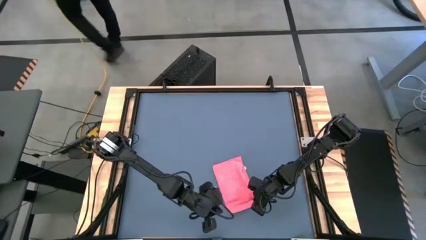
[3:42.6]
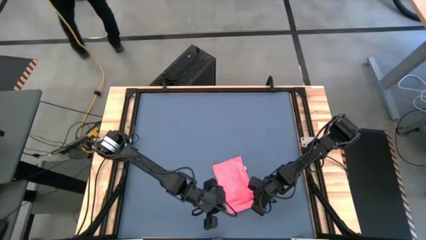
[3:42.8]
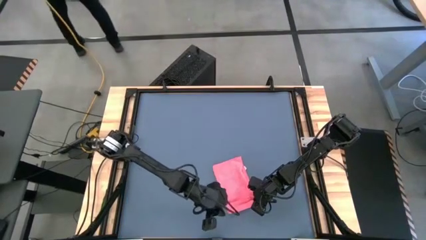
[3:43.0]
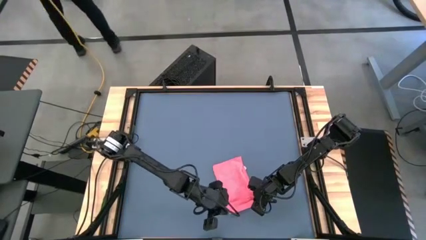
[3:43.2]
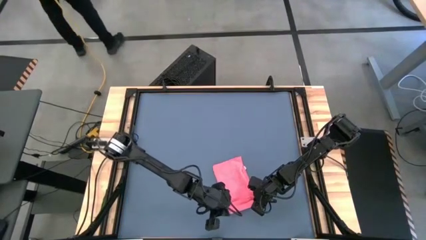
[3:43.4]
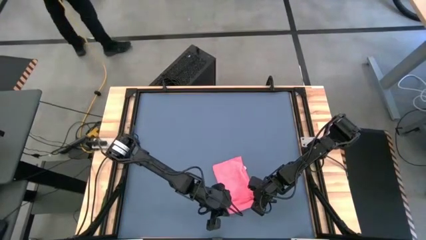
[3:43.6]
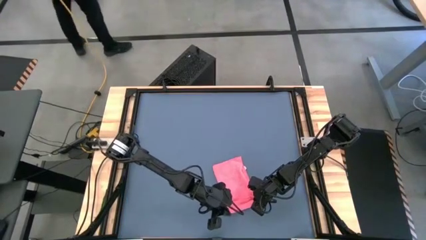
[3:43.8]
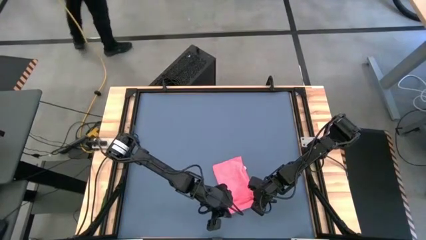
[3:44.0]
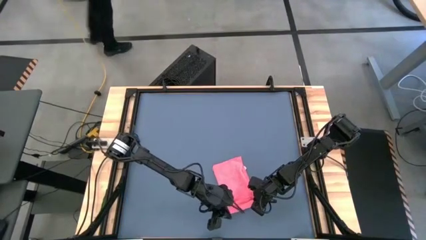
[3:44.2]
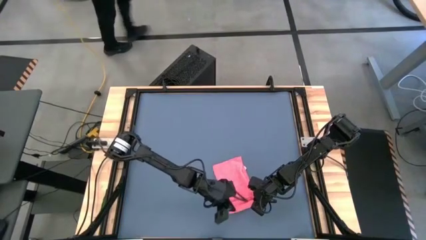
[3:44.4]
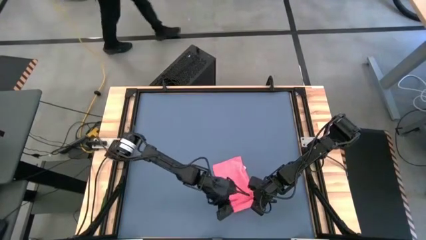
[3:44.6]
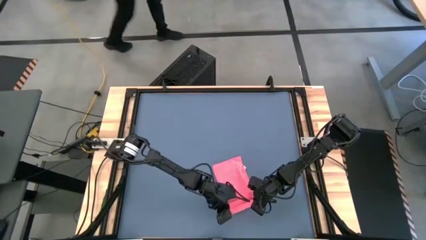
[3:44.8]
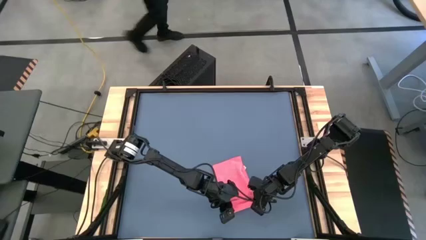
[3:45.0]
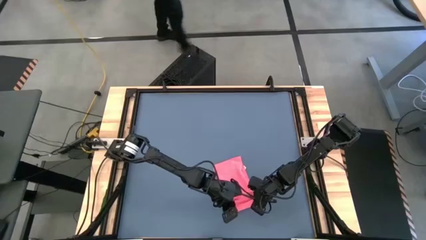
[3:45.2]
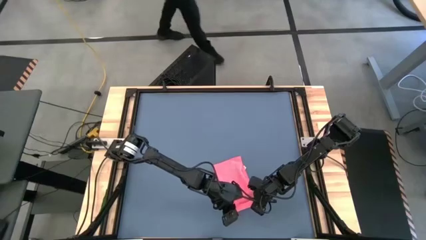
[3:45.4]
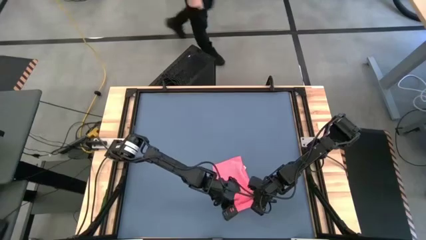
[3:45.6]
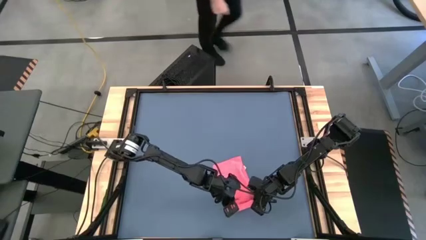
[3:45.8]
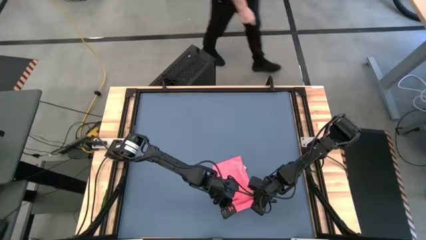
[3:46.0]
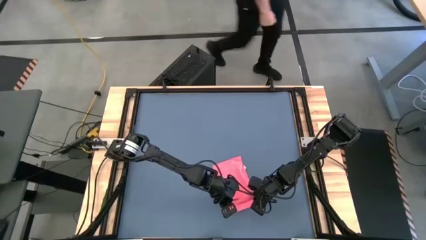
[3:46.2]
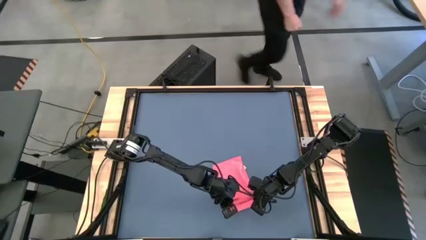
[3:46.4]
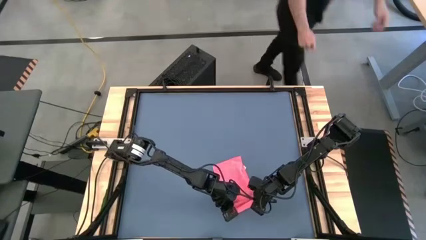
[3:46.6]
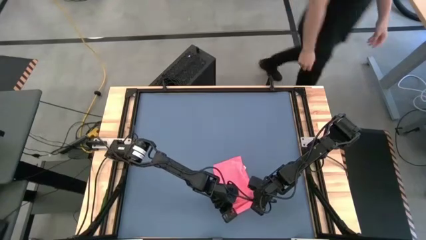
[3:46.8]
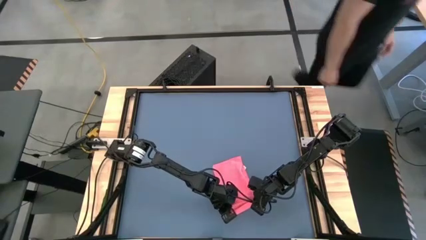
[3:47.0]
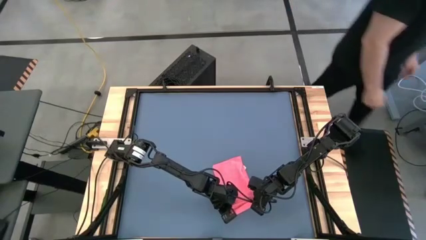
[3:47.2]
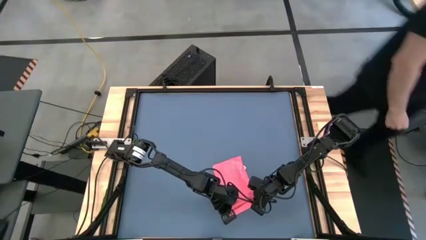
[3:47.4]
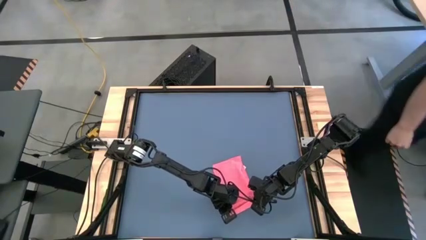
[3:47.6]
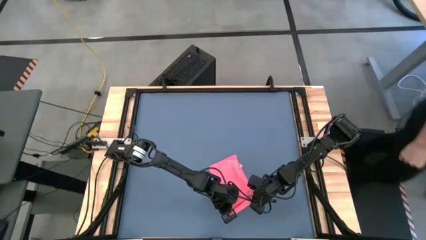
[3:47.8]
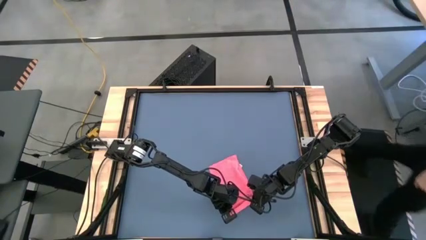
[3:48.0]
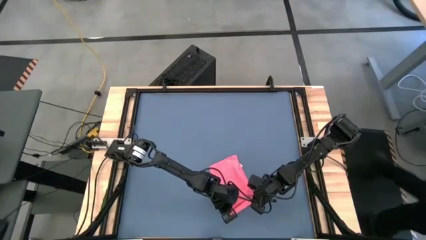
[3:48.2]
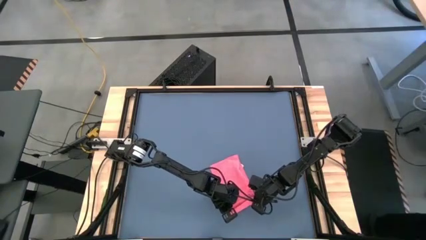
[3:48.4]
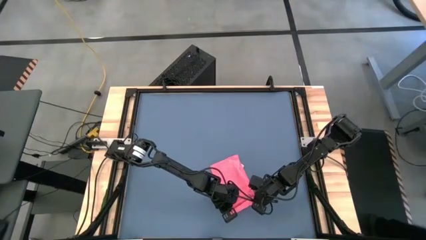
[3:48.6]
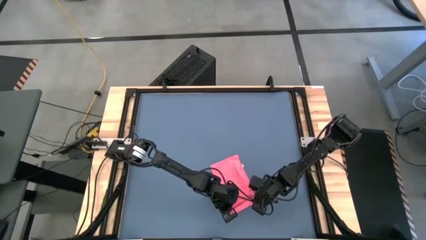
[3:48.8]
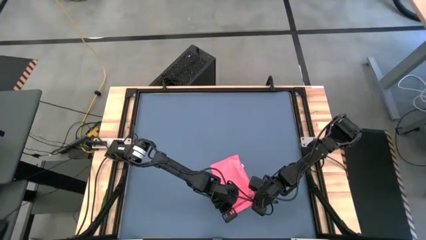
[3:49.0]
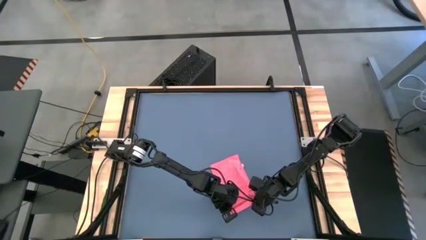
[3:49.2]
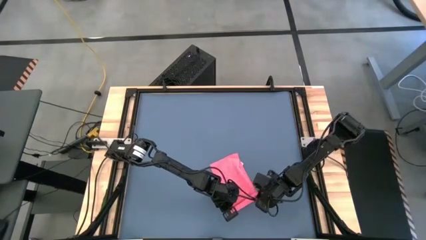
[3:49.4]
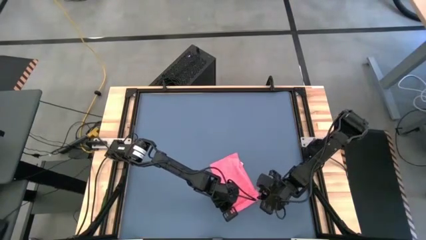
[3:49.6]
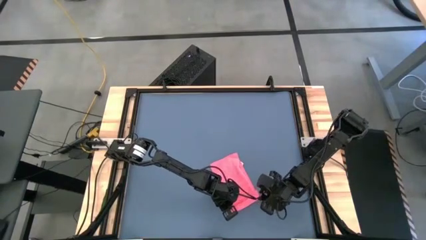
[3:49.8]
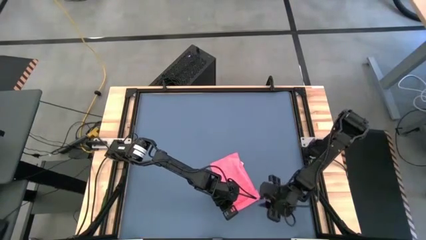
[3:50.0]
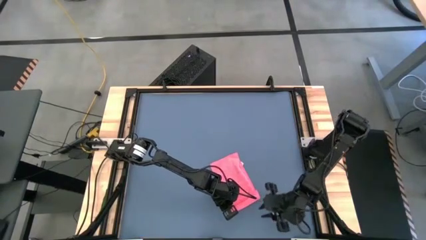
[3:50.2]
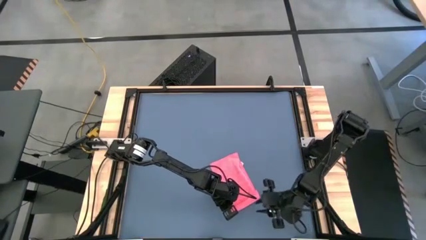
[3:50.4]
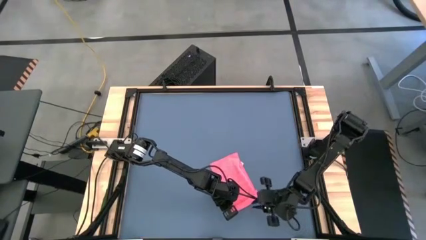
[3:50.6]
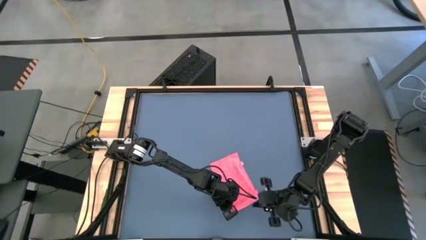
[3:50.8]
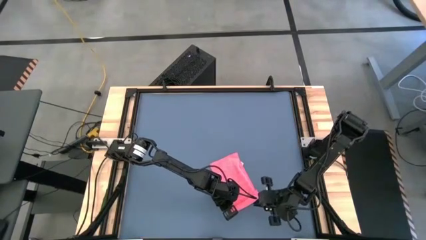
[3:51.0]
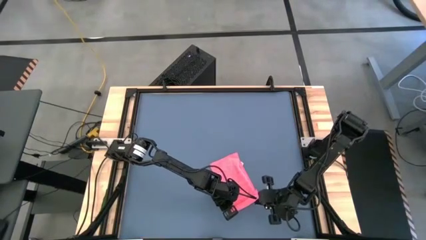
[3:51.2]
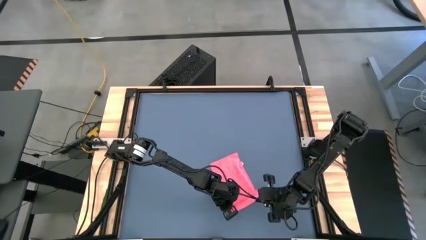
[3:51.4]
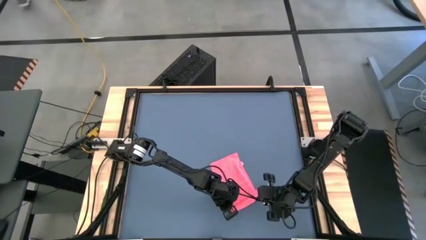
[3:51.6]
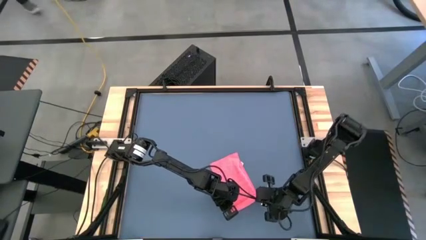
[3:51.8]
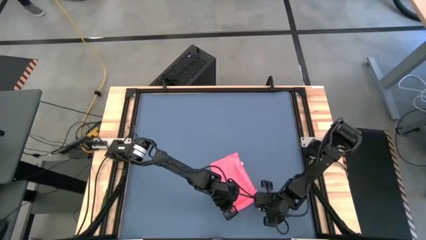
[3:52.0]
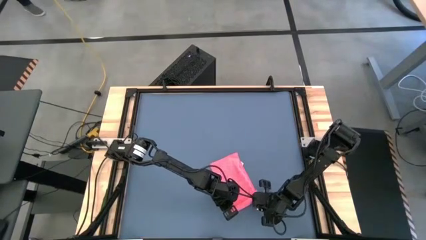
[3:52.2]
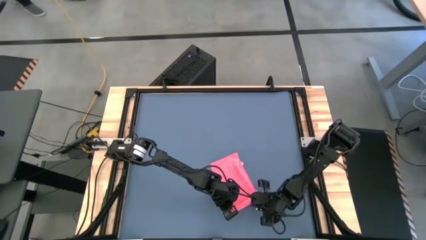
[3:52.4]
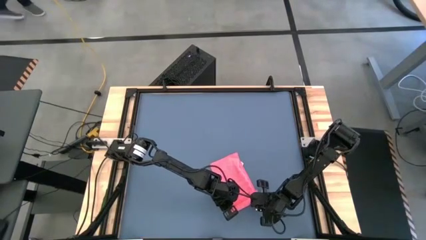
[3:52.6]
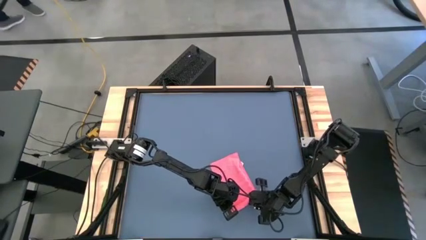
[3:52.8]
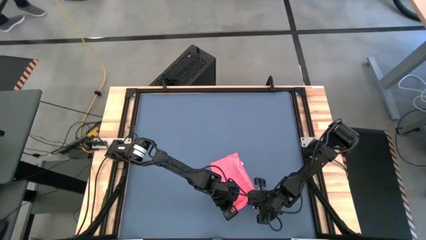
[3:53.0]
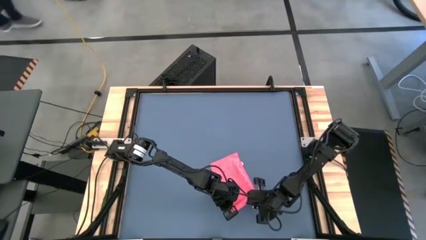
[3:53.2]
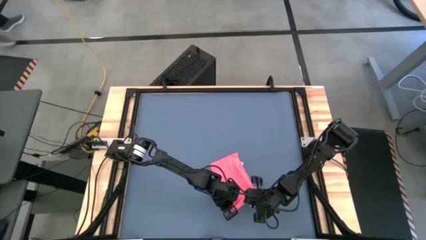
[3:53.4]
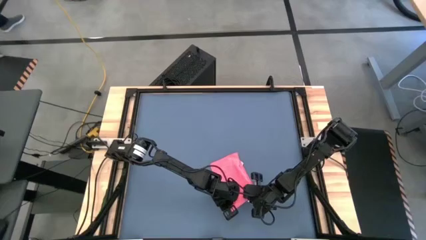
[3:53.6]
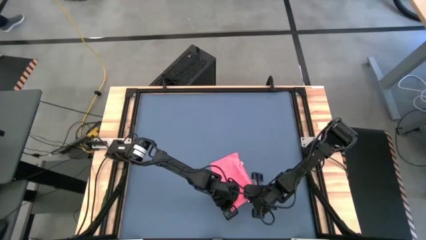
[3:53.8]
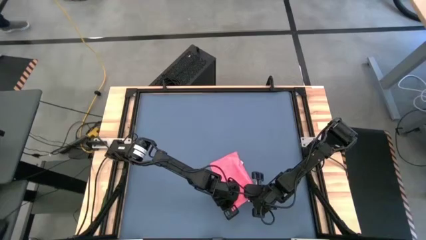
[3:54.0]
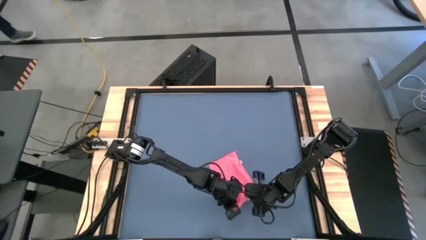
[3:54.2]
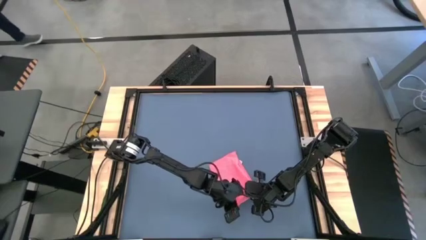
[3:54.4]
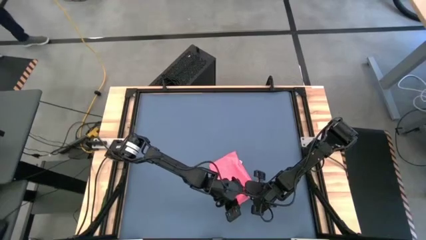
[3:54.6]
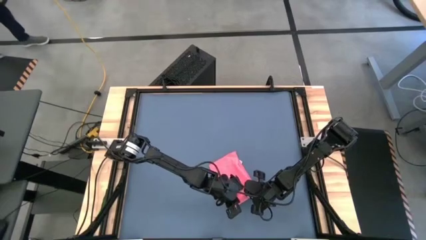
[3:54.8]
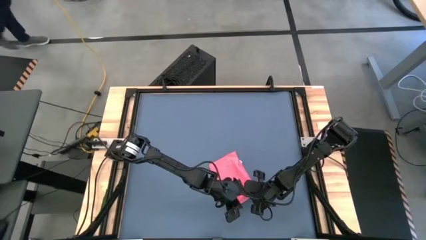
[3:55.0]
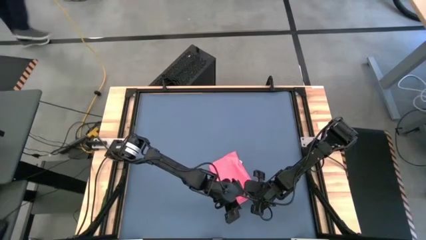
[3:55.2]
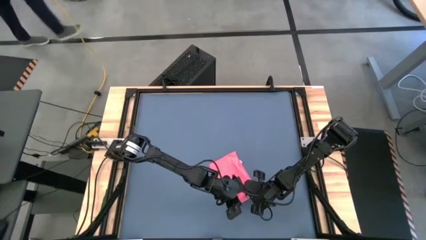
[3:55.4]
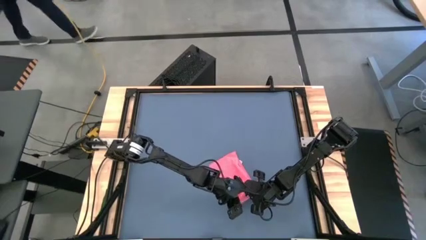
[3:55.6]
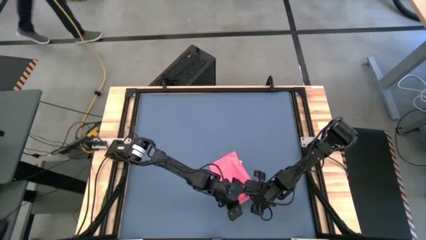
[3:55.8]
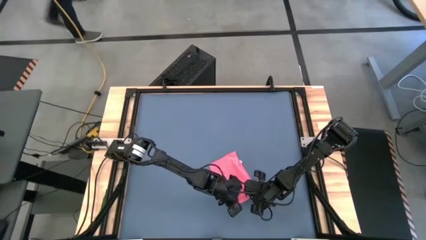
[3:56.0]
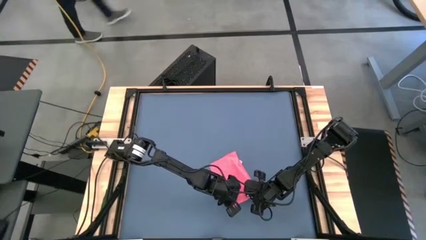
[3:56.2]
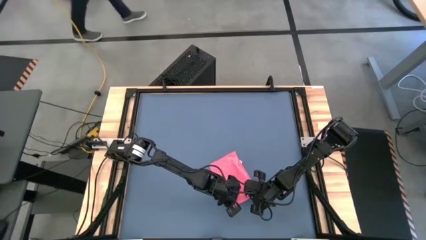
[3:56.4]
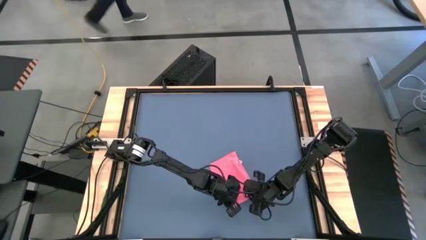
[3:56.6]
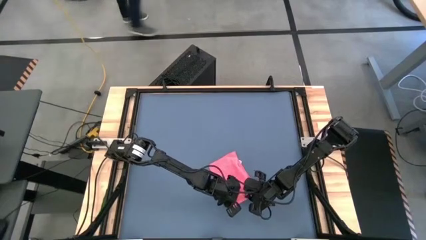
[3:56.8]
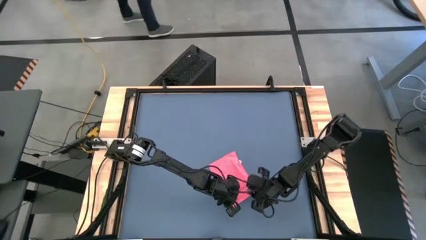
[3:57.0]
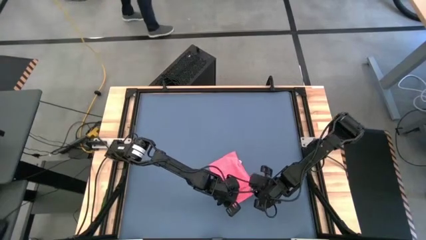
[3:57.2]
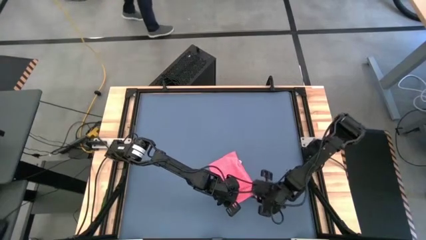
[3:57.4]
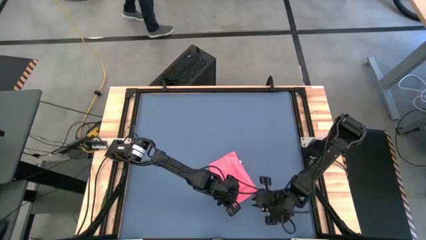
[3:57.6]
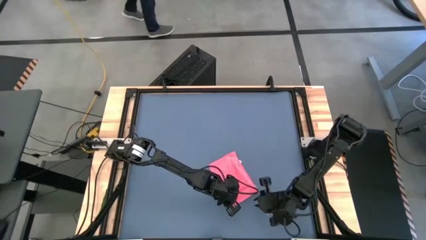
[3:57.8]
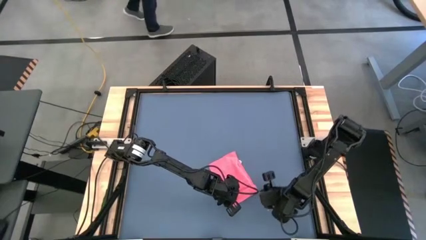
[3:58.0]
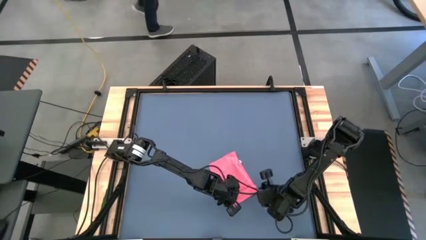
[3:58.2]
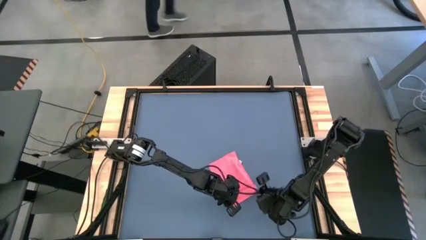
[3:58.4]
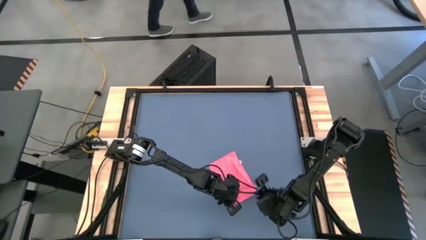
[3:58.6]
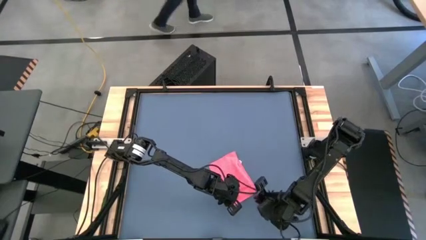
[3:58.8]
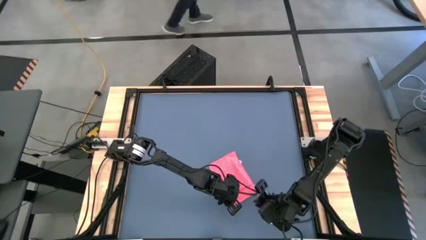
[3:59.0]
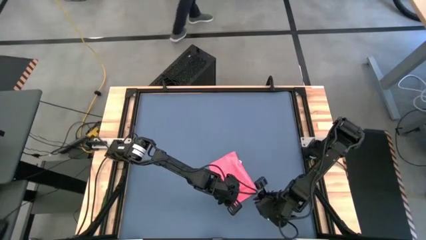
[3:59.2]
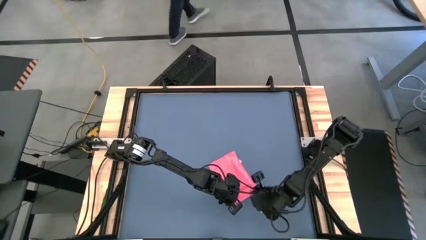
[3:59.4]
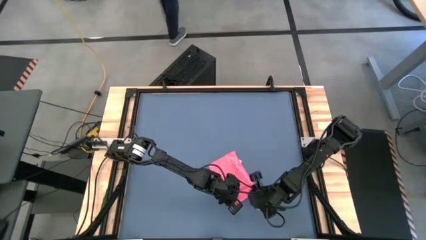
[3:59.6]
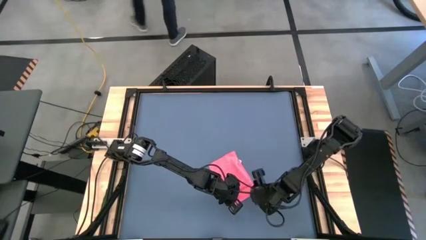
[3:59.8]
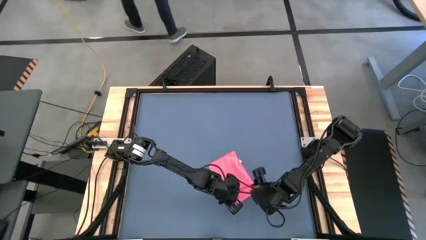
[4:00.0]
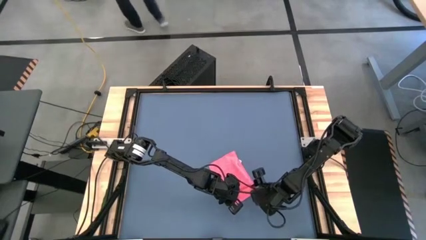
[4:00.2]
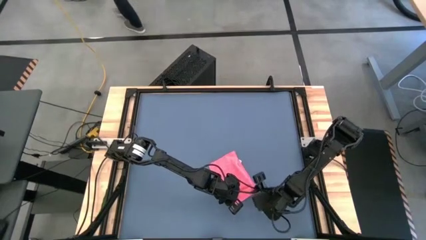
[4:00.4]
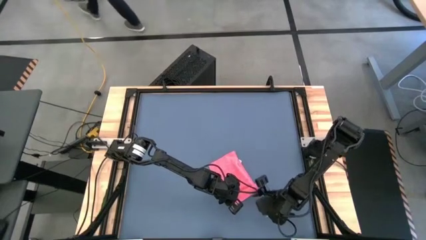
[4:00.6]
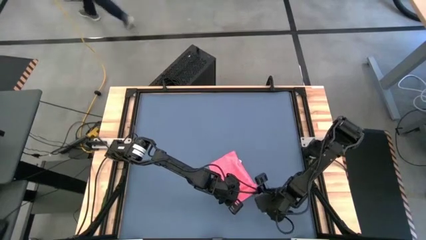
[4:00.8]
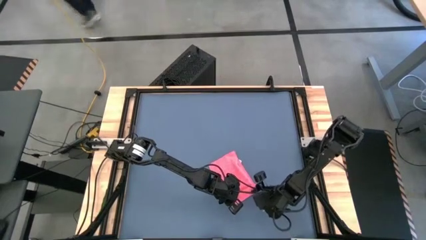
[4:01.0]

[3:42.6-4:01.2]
Task: Roll towel
Roll the pink towel
